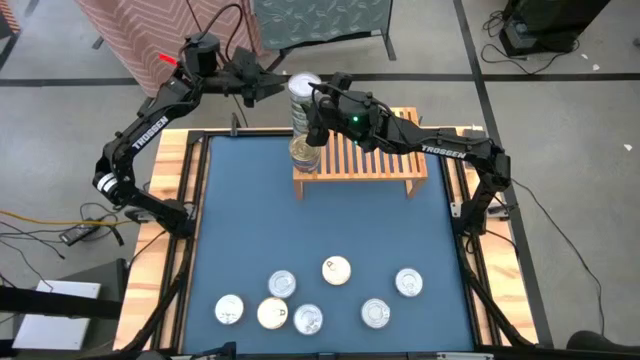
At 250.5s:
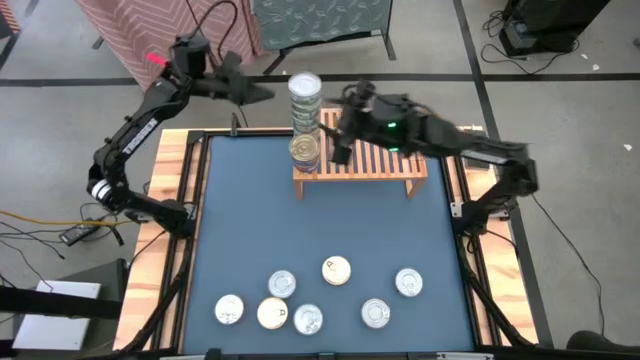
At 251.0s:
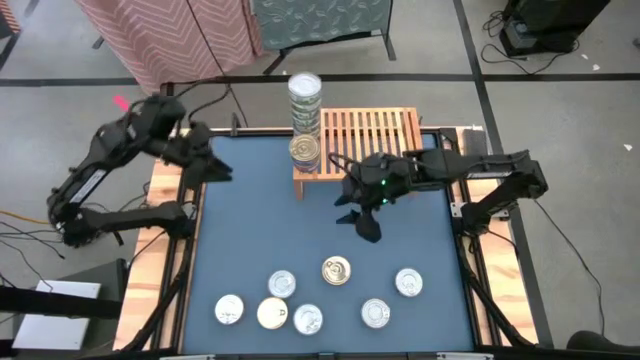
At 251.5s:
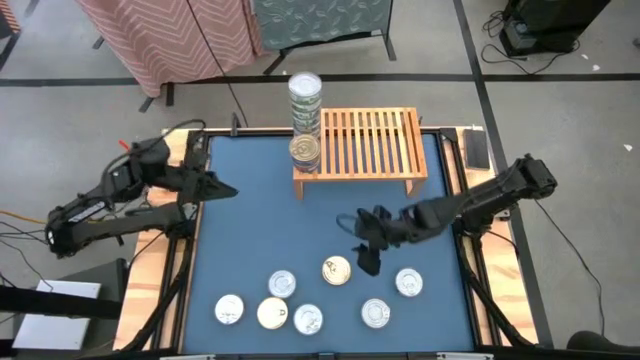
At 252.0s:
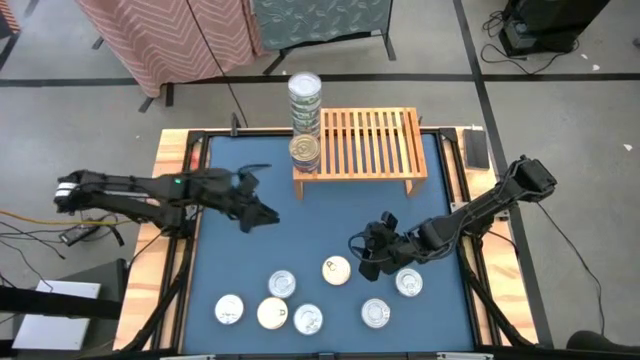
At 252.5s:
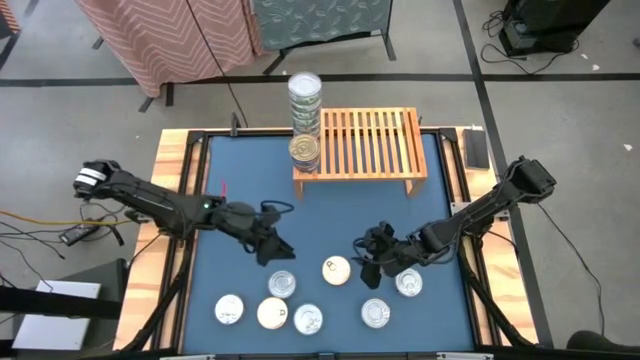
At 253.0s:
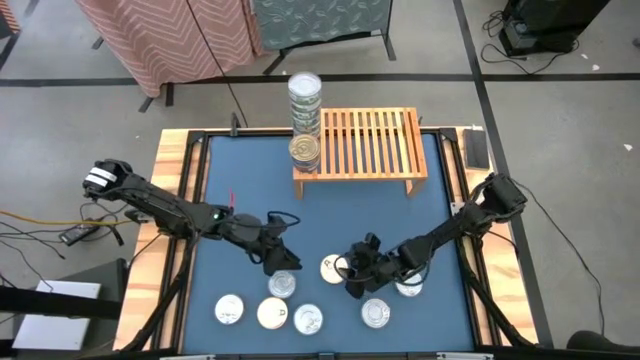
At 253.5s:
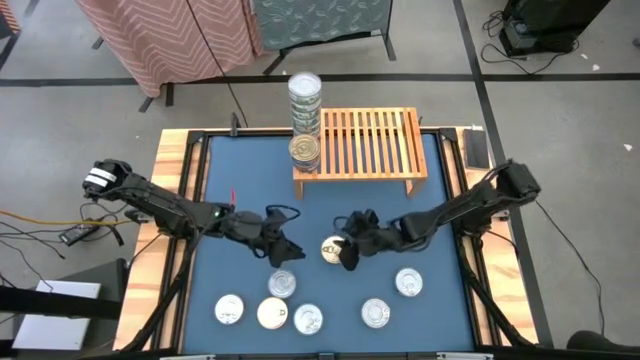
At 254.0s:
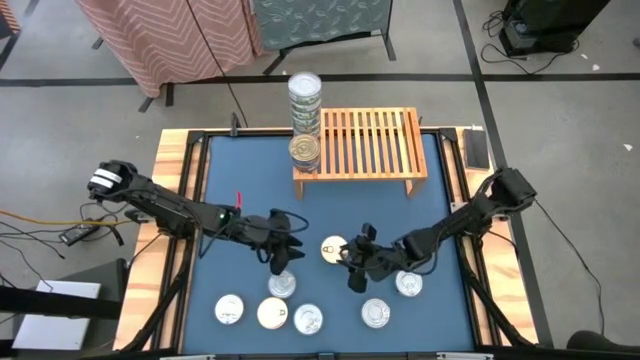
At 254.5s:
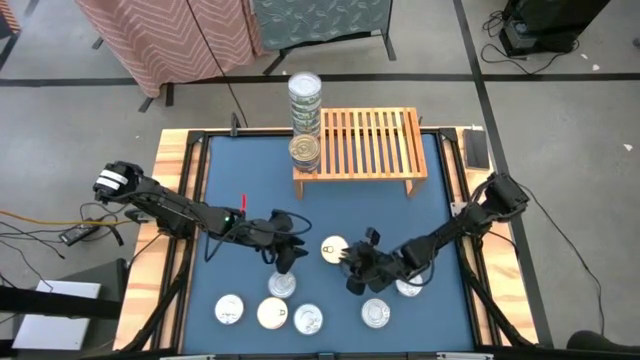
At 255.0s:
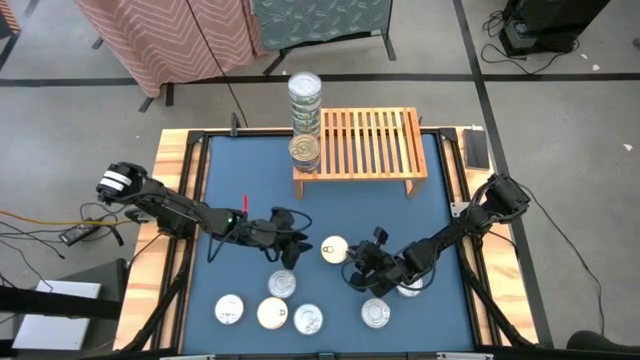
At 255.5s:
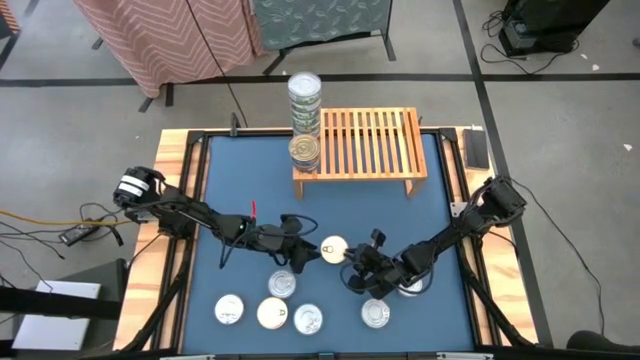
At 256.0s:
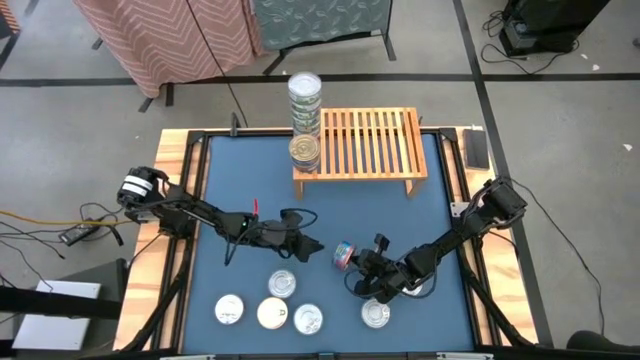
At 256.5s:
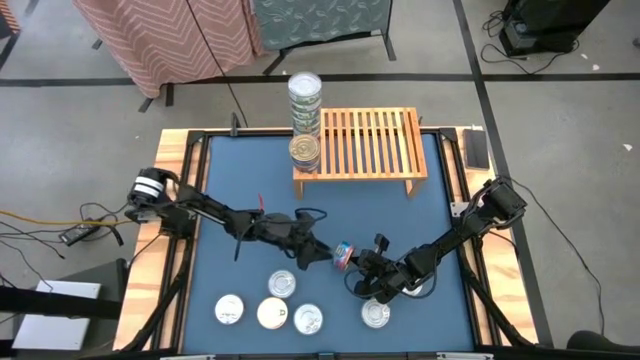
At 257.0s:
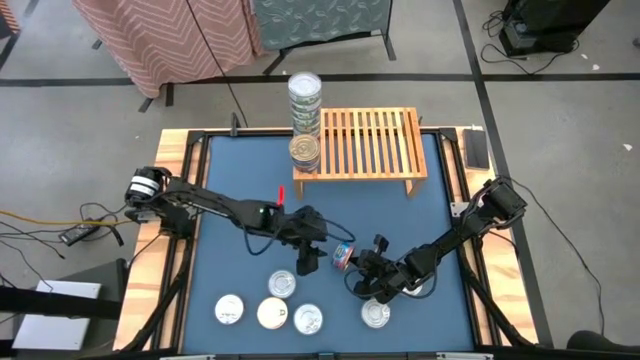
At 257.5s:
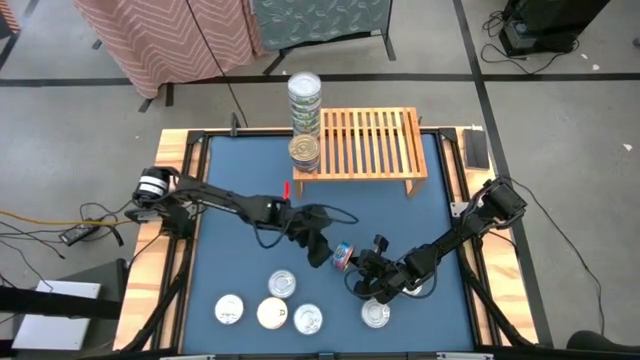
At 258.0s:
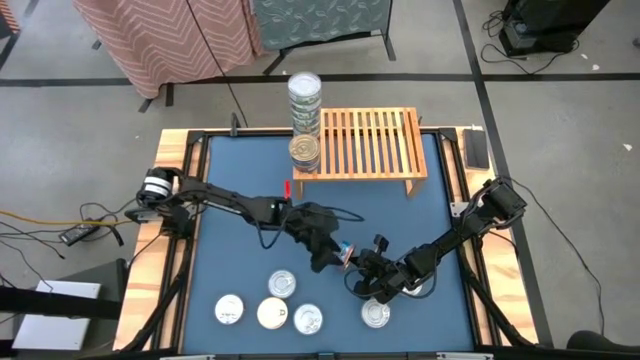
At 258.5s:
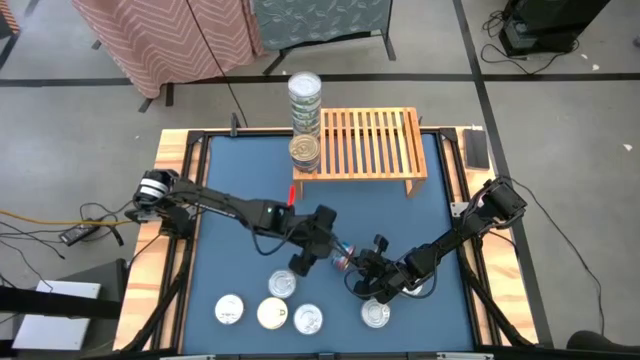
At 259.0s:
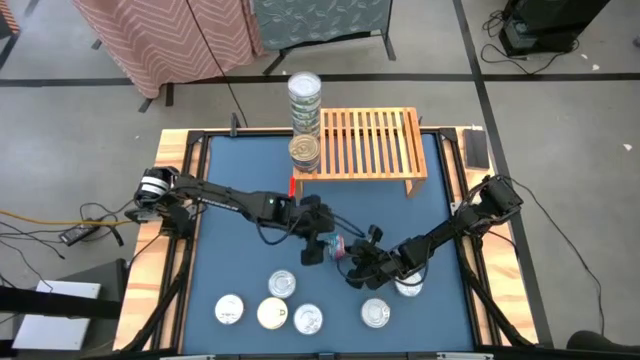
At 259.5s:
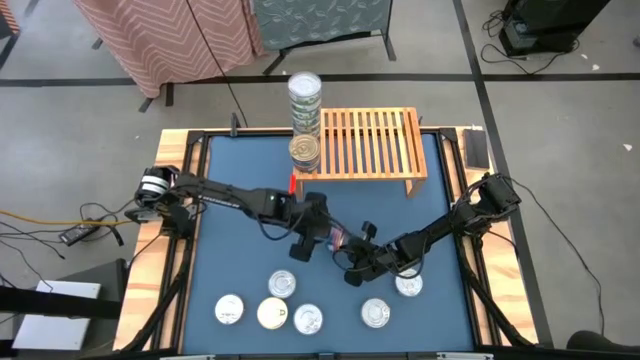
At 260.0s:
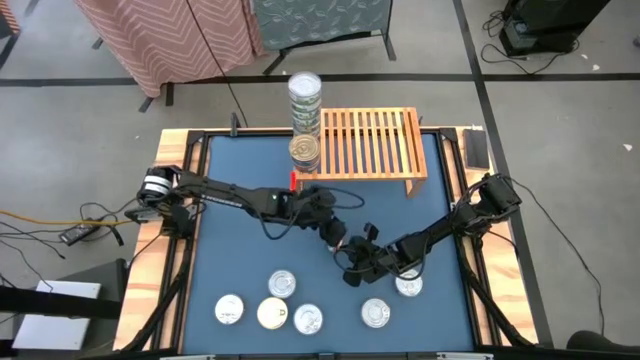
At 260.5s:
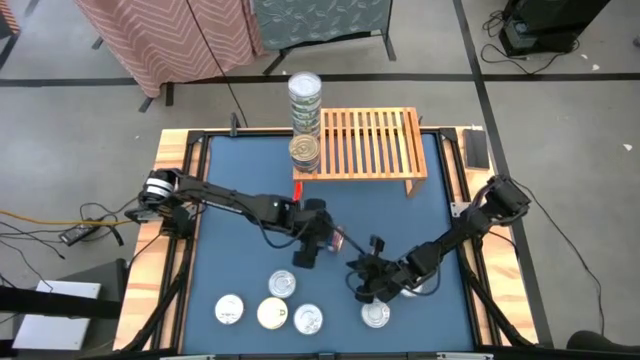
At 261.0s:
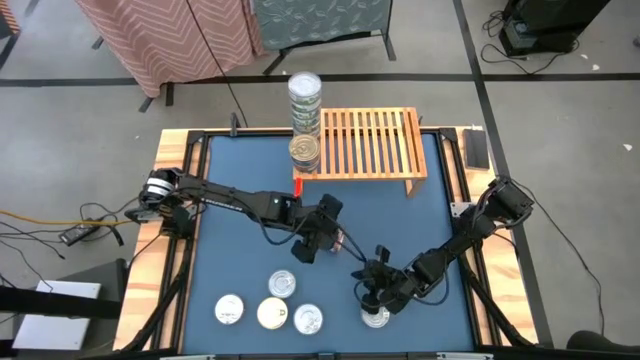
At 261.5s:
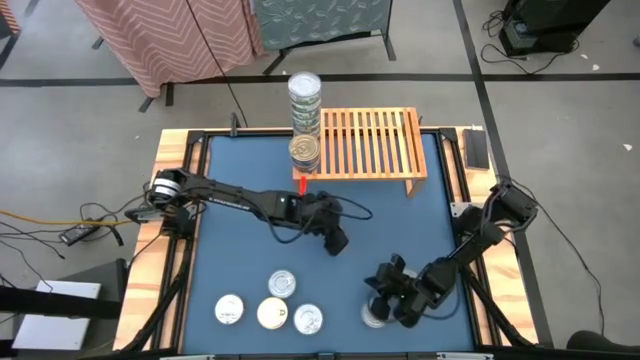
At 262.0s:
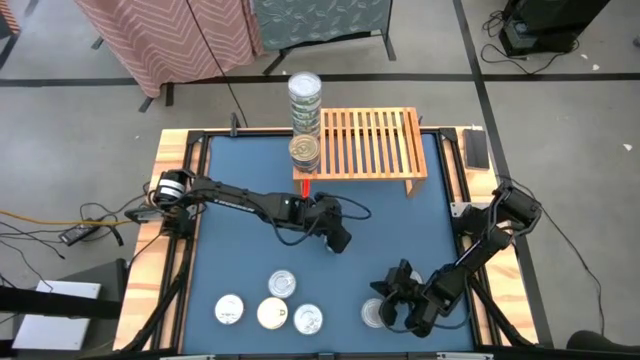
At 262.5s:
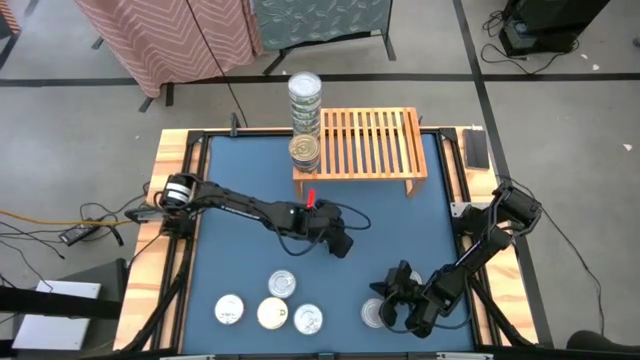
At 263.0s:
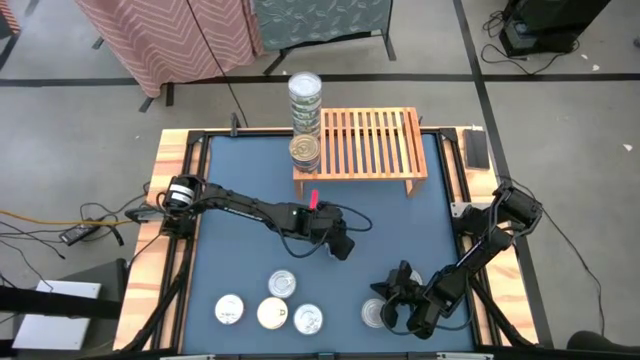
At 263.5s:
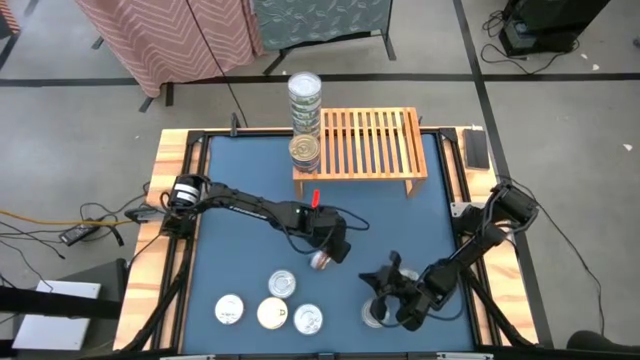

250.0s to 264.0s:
Task: Stack canned seafood by type on shelf
Stack the blue tuna can on top of the other blue tuna cans on the shelf

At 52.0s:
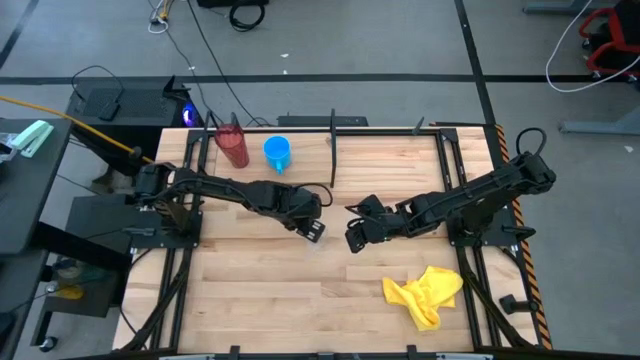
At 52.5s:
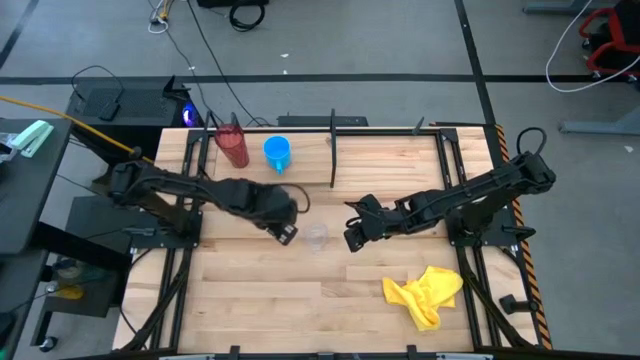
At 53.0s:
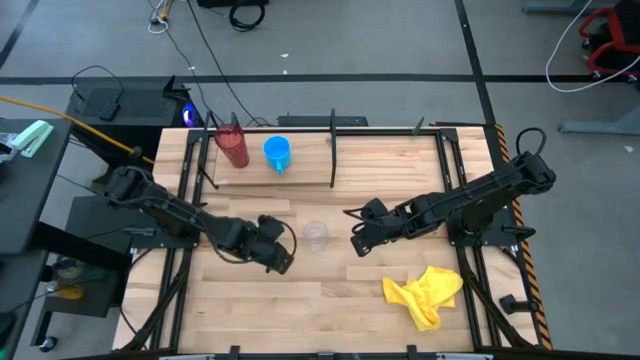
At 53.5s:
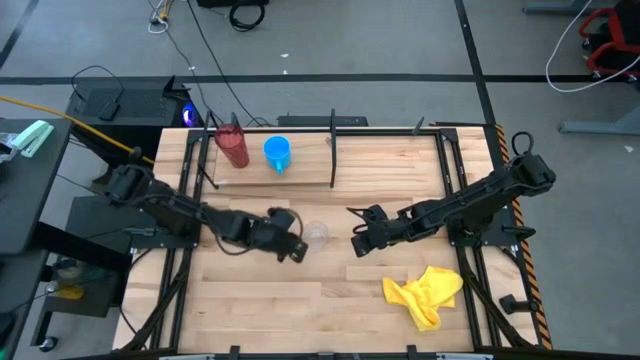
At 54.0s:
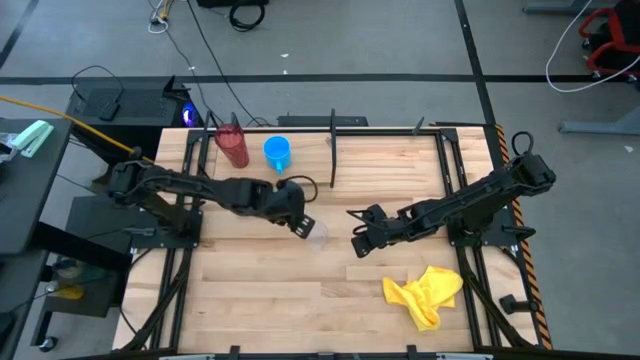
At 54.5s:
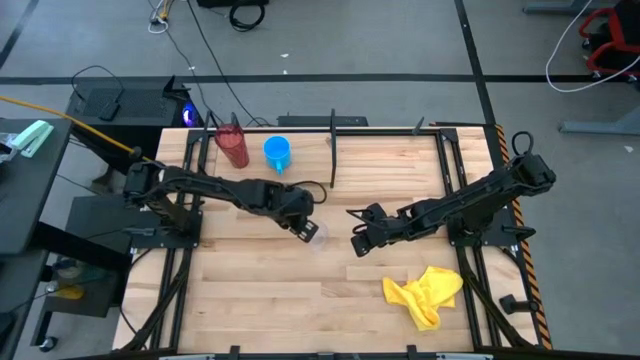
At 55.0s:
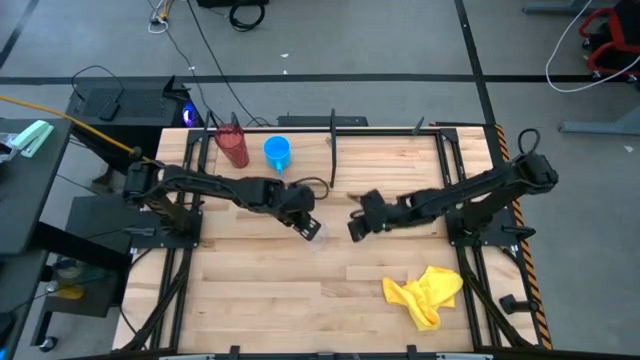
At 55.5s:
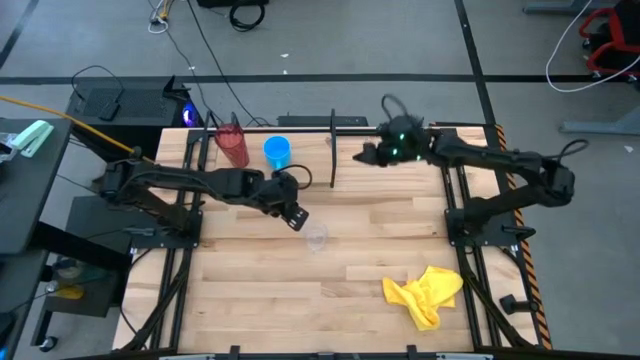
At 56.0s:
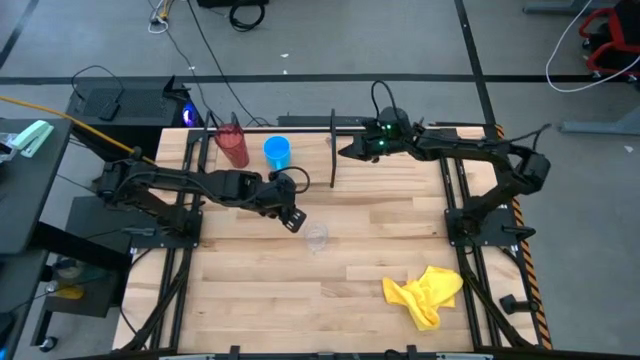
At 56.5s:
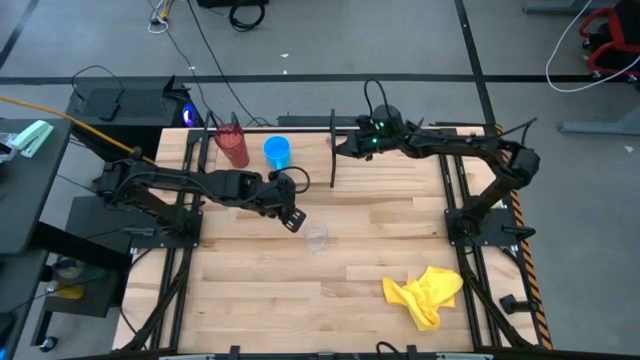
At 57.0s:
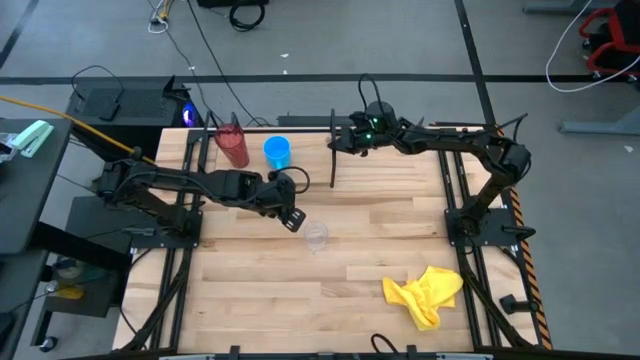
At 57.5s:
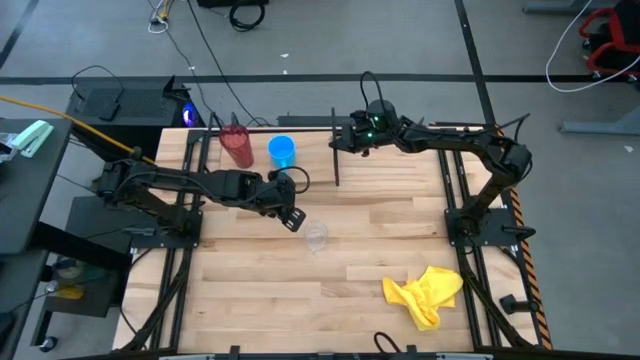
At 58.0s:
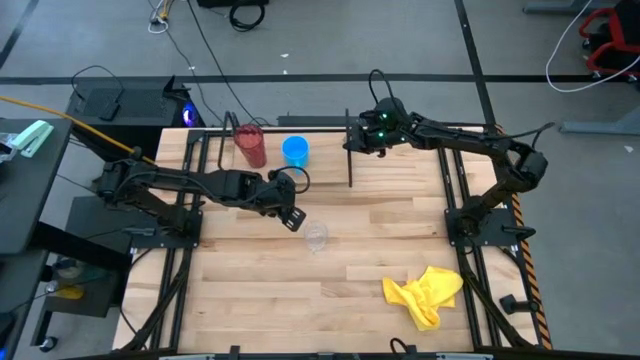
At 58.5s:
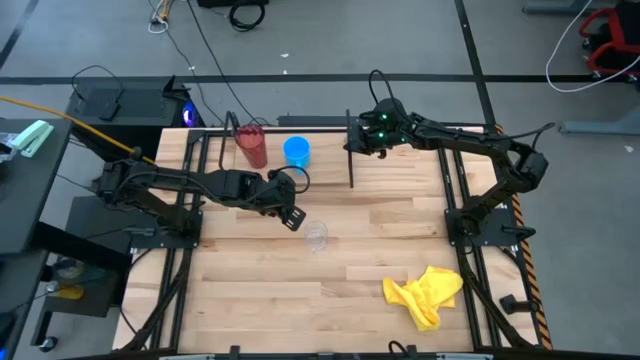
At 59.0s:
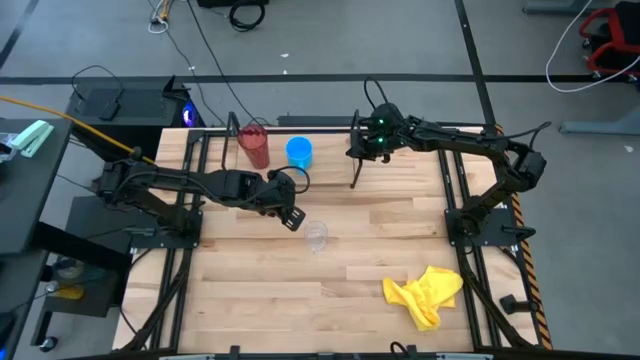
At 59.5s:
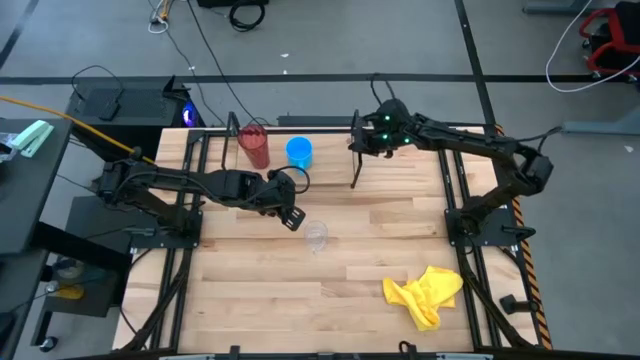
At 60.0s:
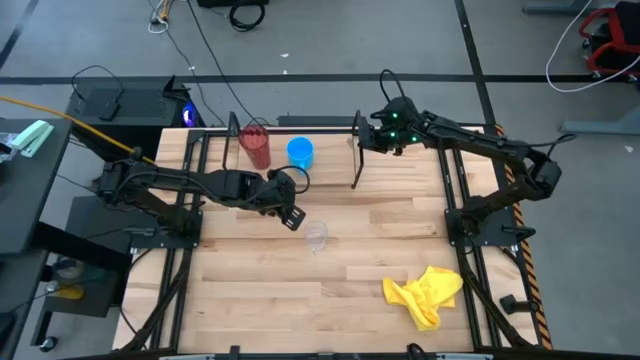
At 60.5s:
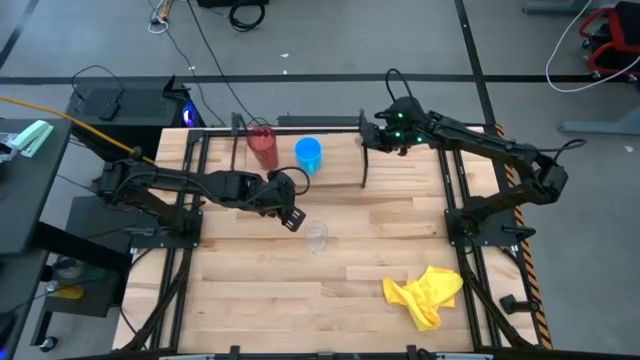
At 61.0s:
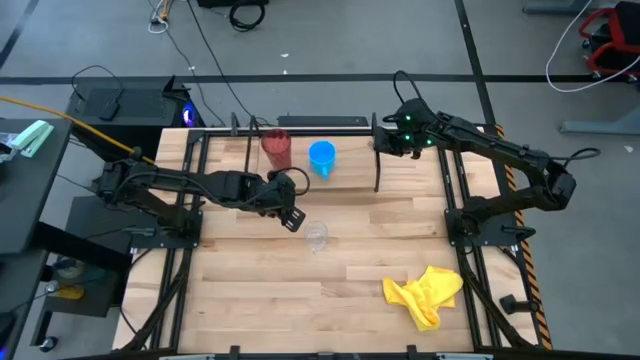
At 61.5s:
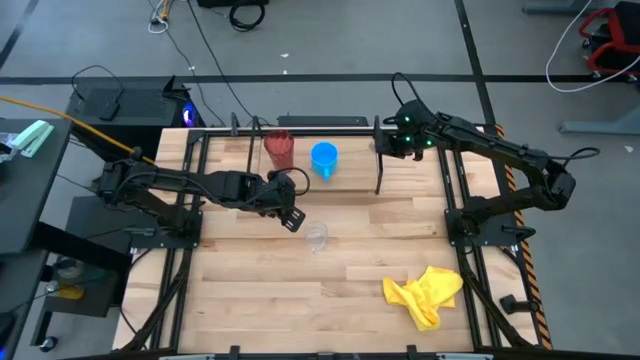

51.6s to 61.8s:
Task: Stack small to large cups/mugs on shelf
Adjust the shelf to the middle of the table
